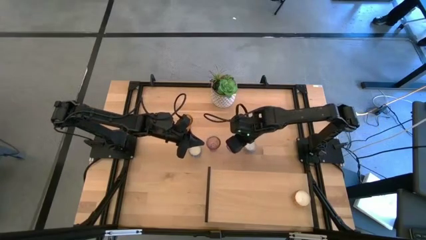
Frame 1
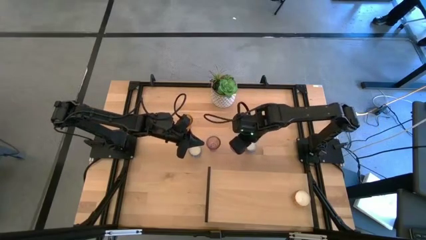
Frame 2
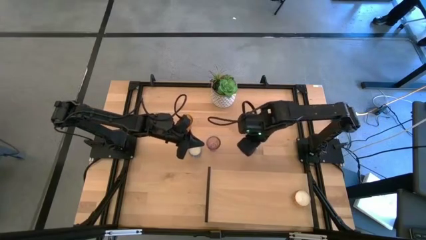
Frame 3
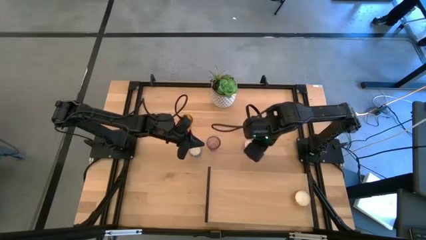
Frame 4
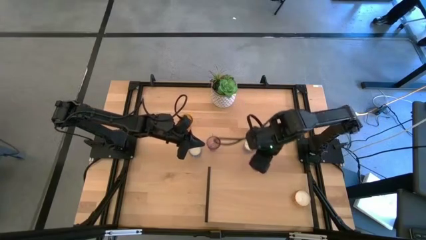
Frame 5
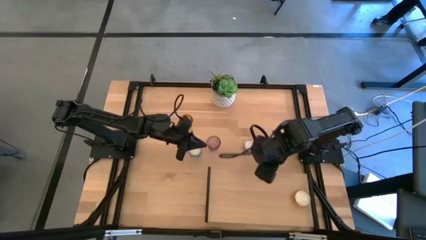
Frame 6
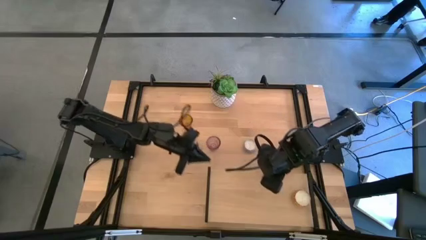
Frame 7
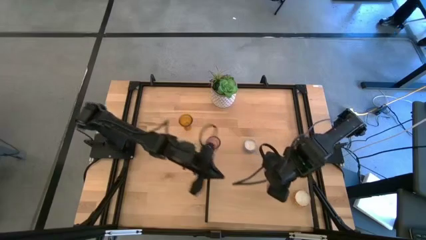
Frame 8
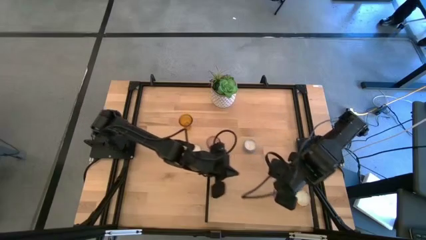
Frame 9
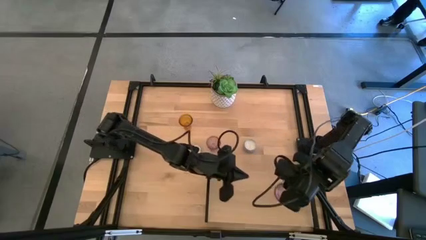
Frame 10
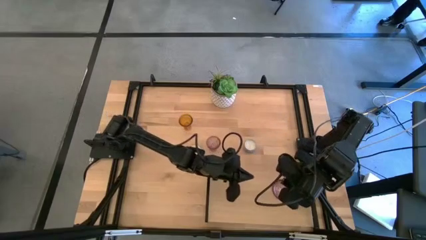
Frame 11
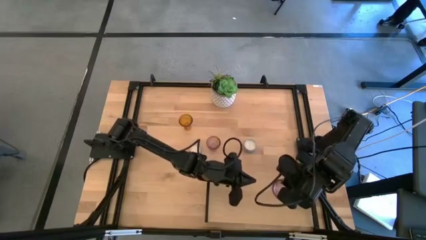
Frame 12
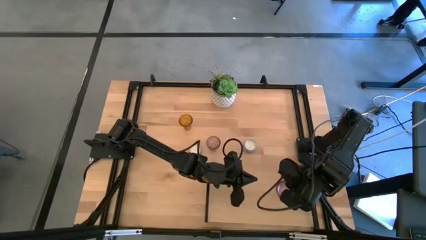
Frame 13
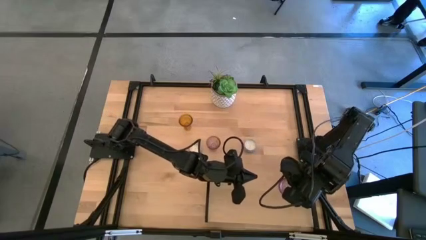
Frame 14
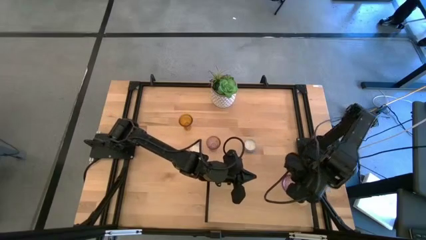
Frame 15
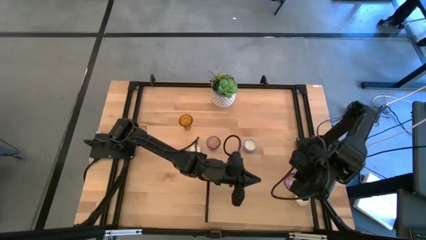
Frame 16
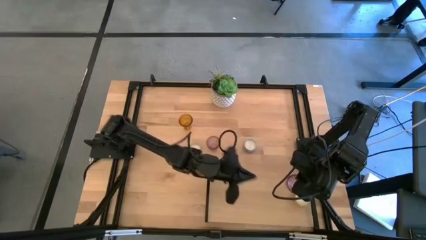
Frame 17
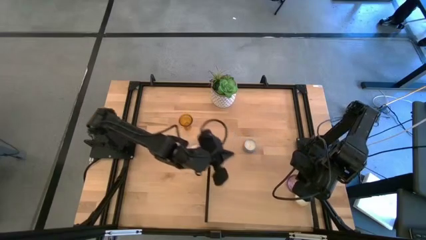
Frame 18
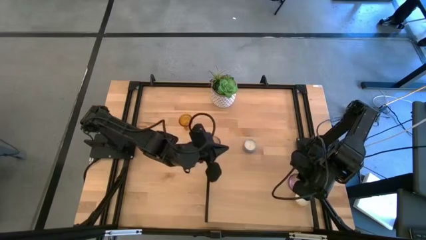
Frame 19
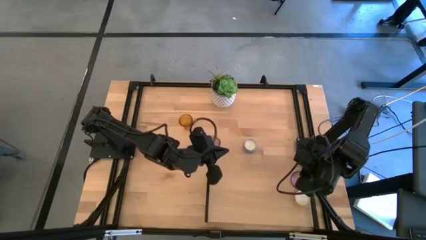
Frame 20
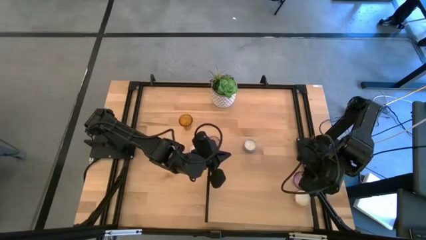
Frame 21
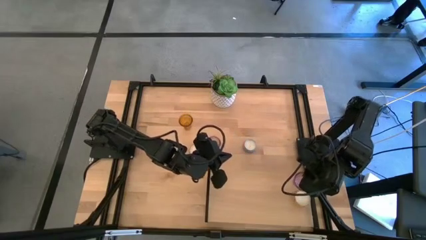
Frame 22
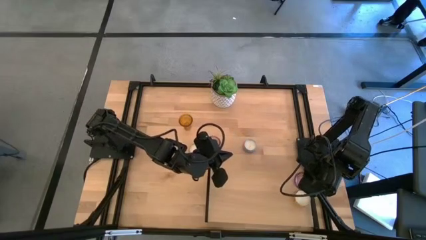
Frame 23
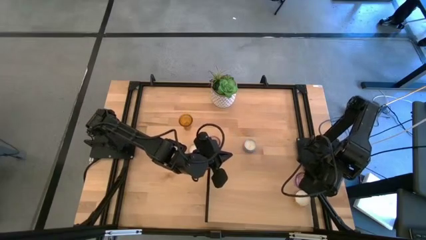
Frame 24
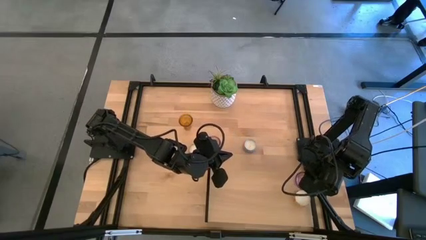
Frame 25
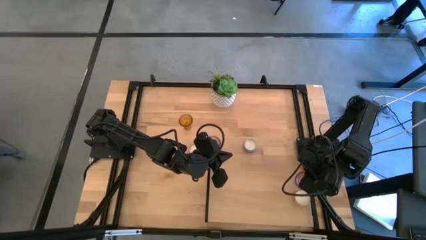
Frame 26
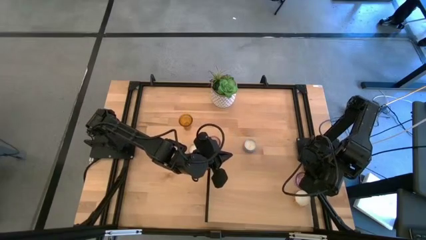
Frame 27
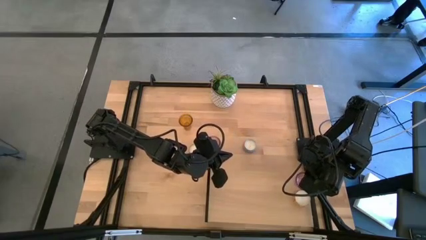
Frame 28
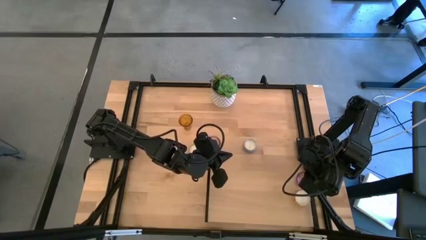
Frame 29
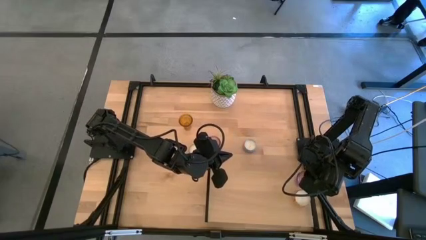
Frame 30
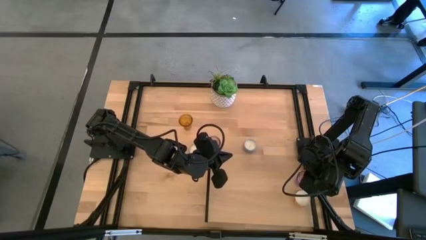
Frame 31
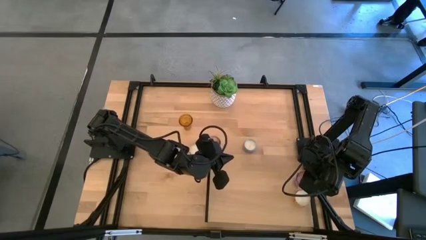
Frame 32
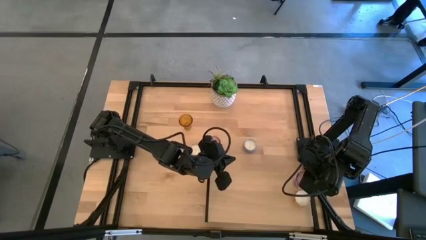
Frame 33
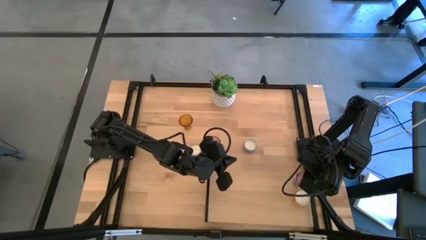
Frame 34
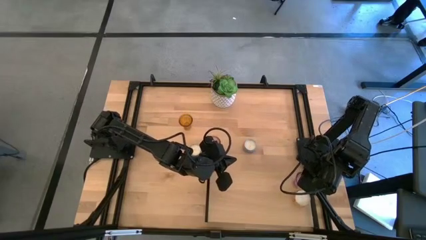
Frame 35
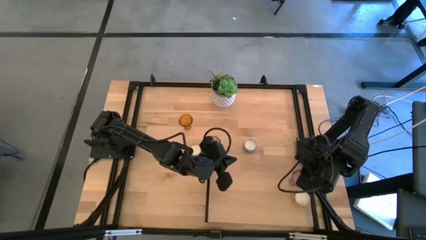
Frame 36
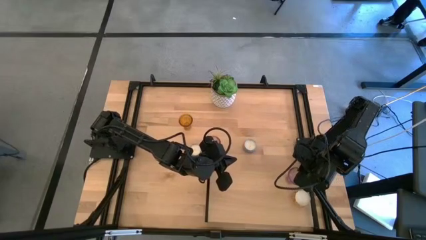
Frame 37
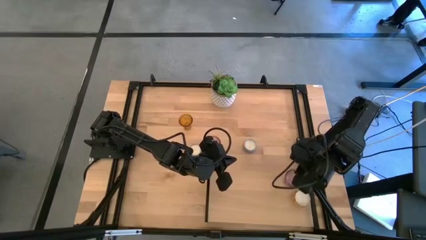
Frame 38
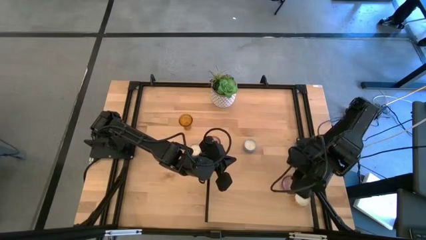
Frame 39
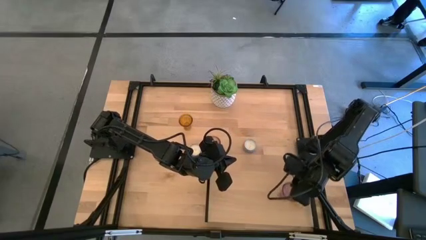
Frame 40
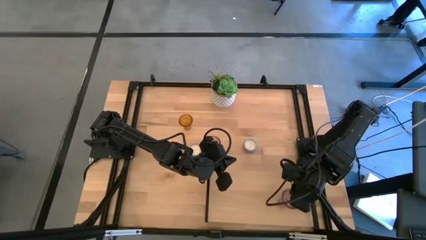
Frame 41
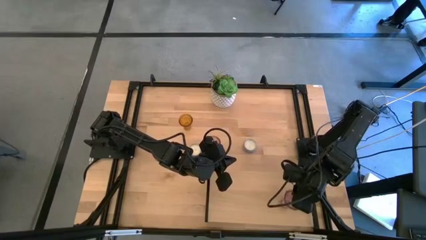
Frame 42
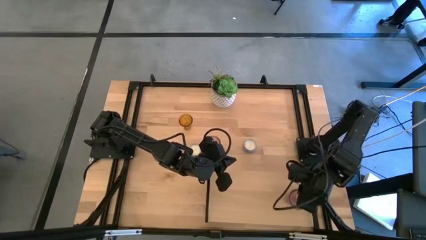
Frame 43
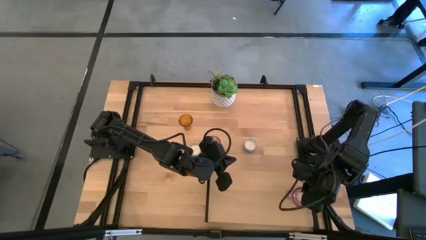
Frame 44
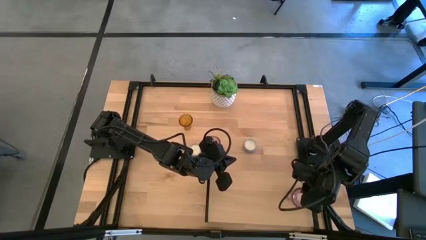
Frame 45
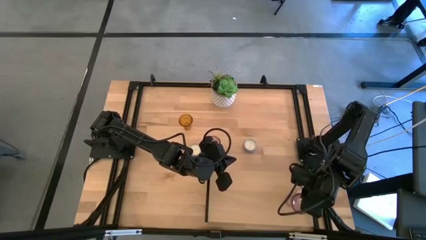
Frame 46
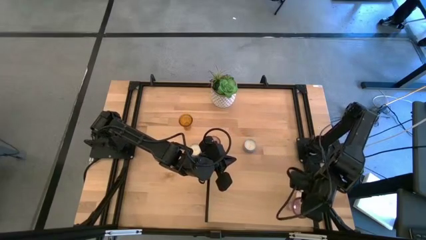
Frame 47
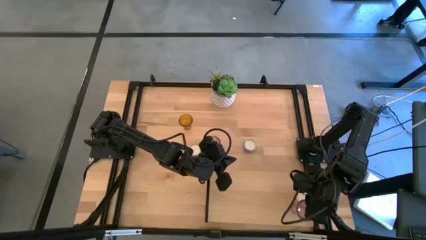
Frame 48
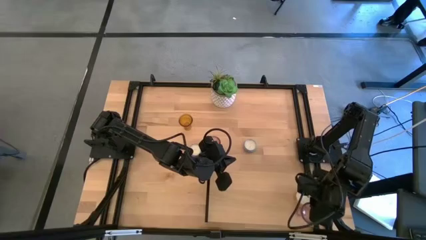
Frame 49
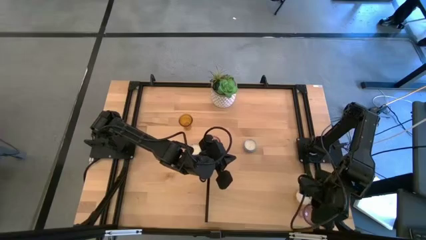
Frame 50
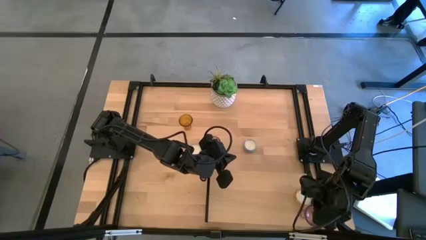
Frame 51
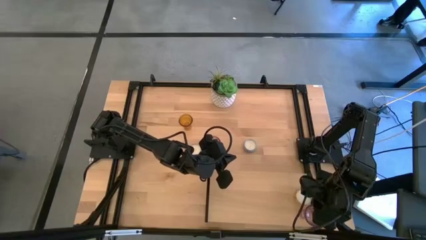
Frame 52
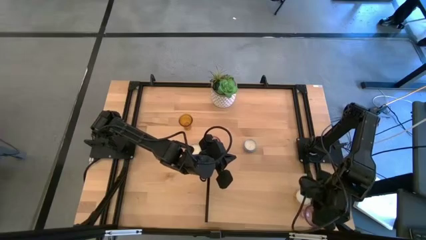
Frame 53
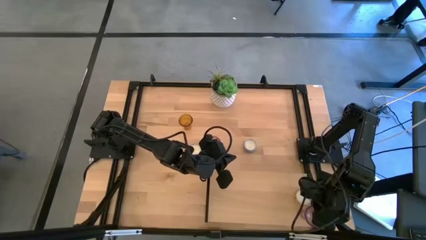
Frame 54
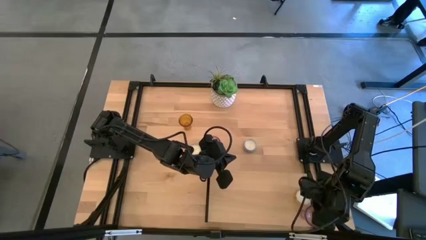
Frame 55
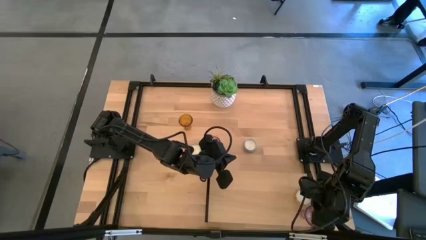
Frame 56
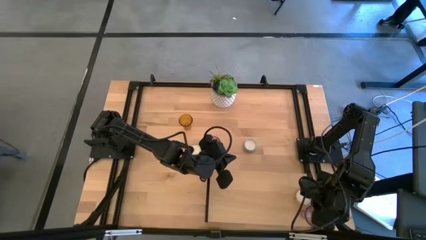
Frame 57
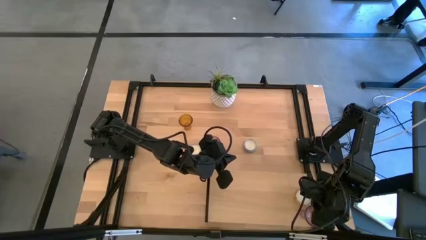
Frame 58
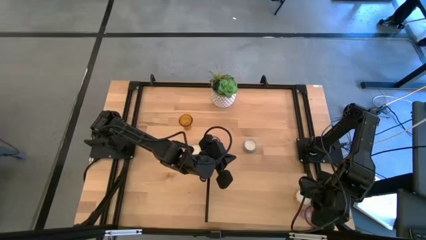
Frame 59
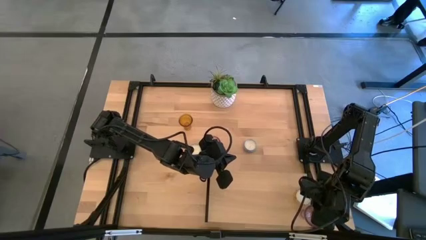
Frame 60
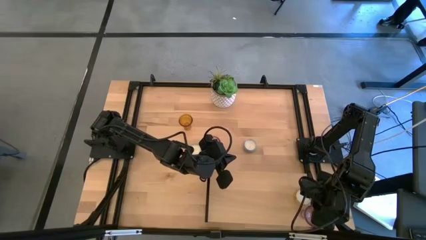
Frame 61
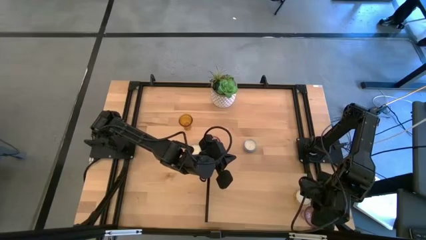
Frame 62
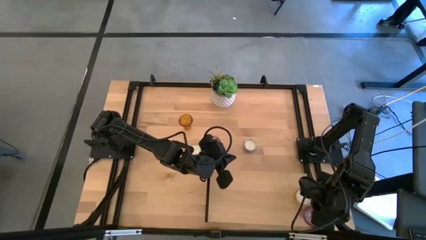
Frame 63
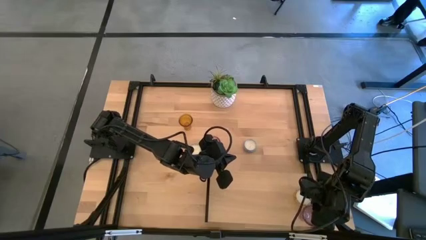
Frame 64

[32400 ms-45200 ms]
Task: Pick & Place candle stick holders
Put the purple glass candle holder on the shelf aligned with the yellow scented candle

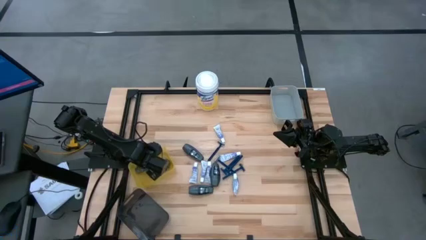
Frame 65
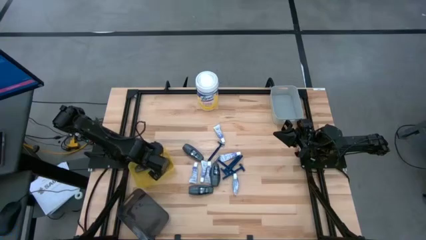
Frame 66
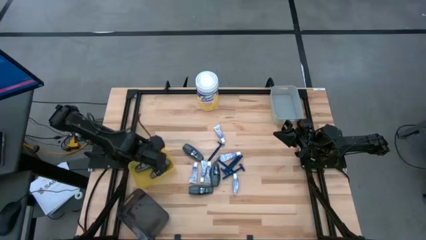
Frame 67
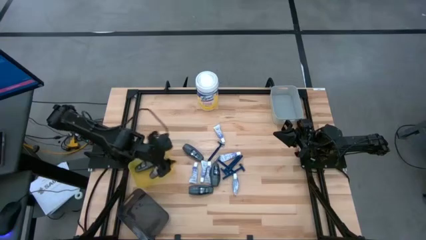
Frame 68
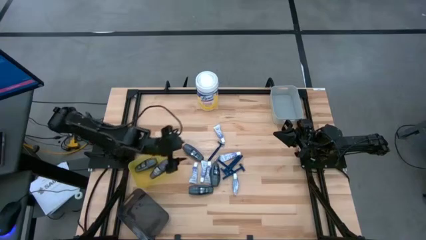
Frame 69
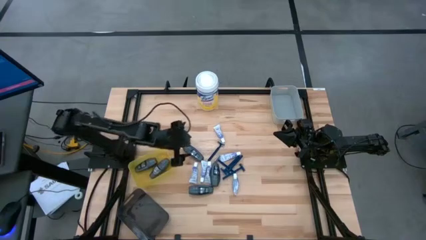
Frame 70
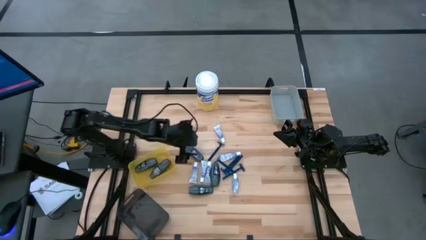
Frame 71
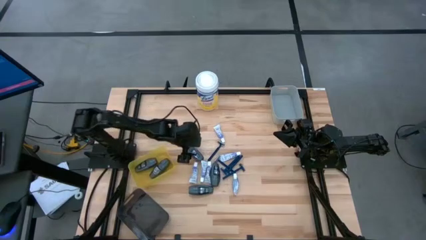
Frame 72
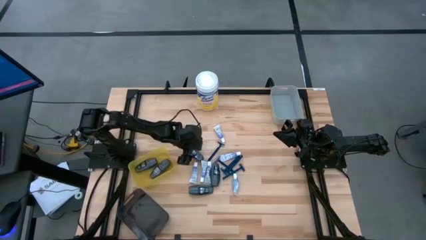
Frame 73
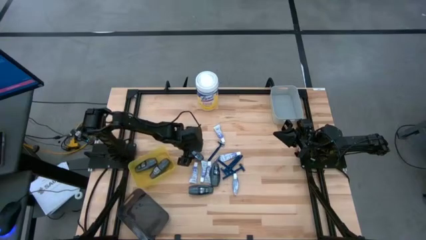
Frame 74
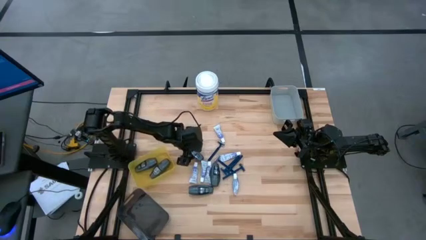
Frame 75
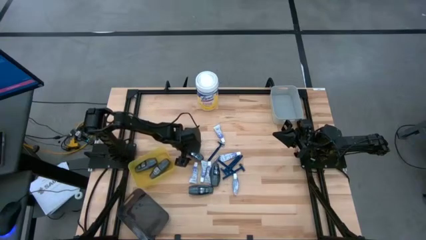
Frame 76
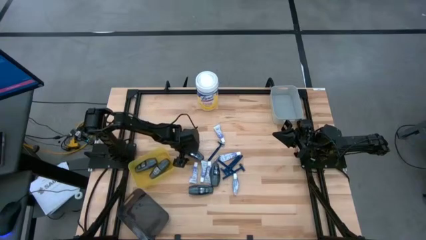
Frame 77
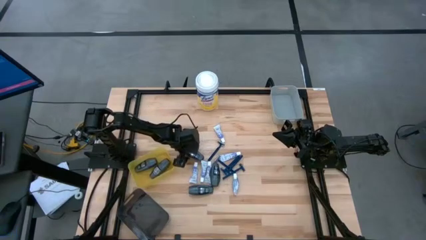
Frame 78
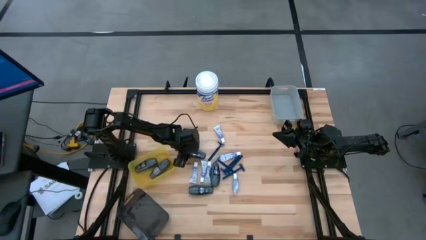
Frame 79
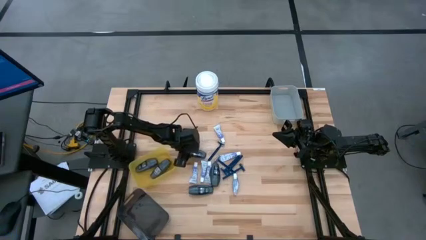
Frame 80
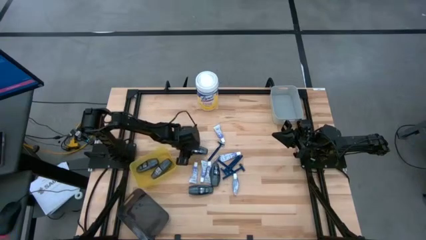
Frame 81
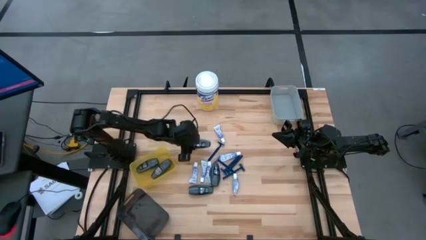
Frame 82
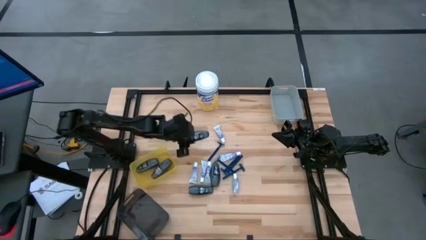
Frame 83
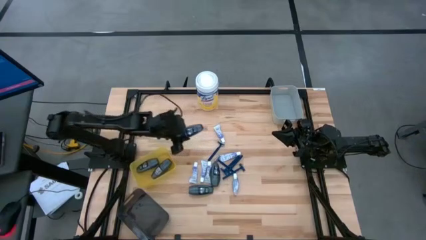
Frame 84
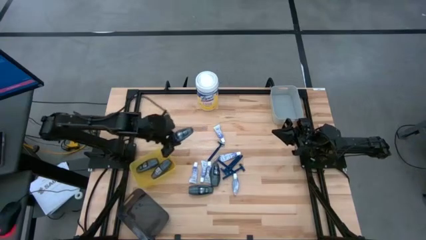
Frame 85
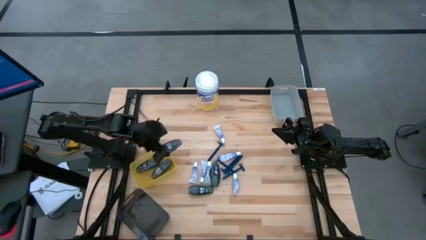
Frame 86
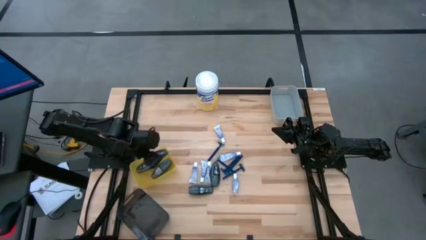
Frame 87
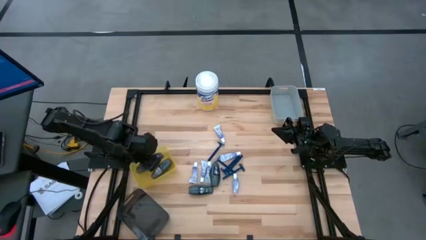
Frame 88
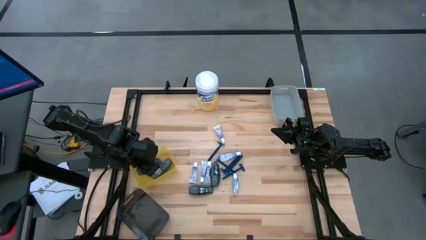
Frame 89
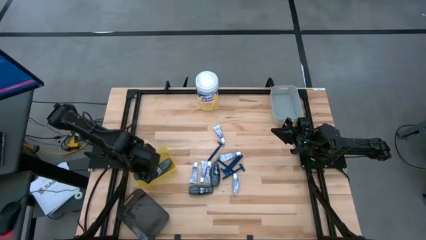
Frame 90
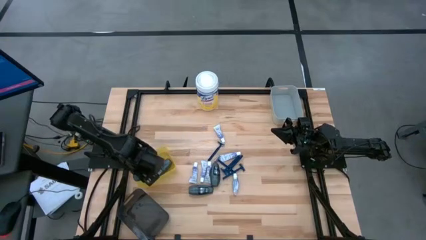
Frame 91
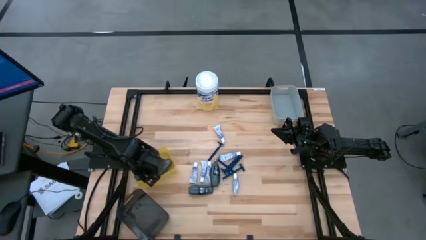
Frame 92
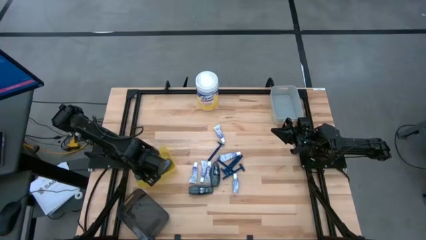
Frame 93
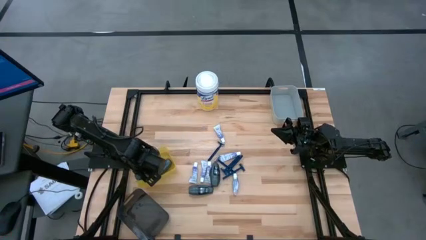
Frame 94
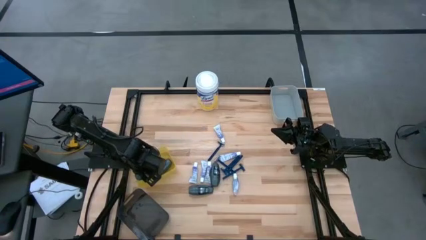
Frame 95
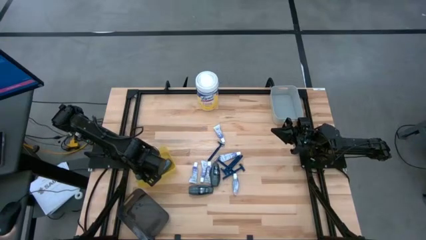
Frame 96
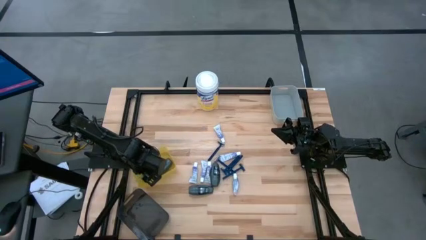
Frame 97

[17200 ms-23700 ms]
Task: Pick & Place Travel size toiletries
Put the black deodorant into the yellow bin
